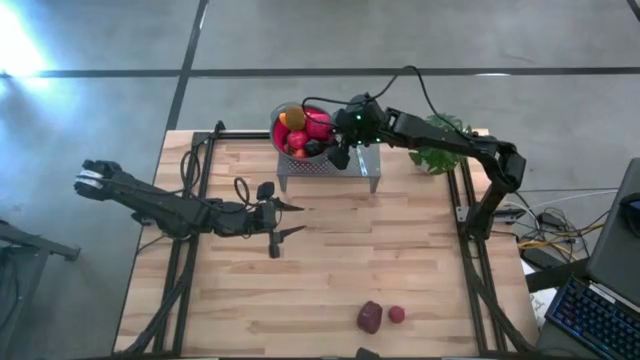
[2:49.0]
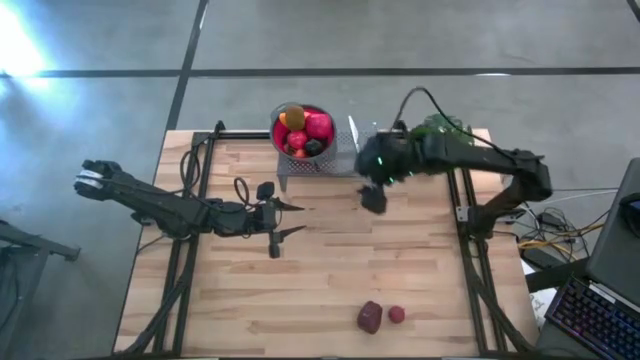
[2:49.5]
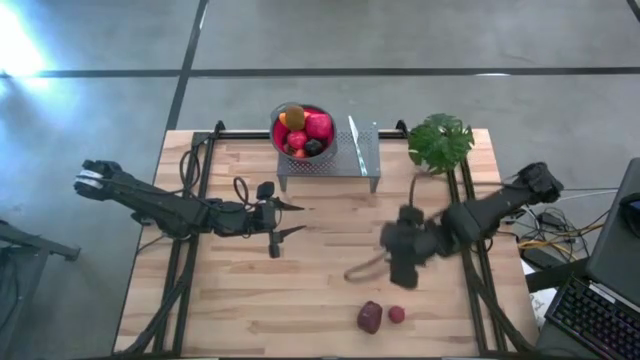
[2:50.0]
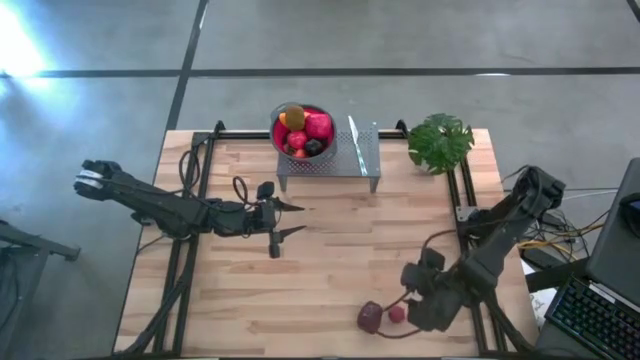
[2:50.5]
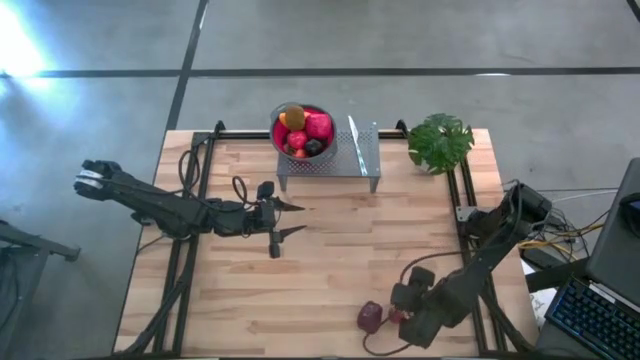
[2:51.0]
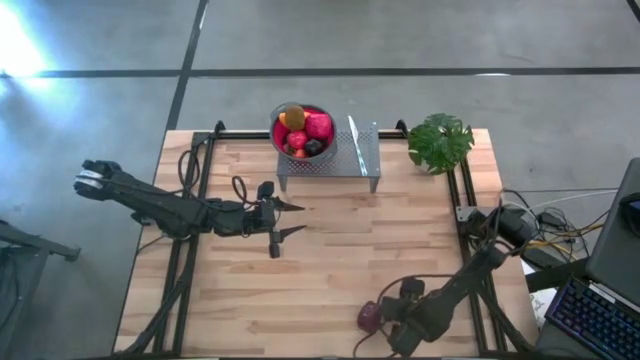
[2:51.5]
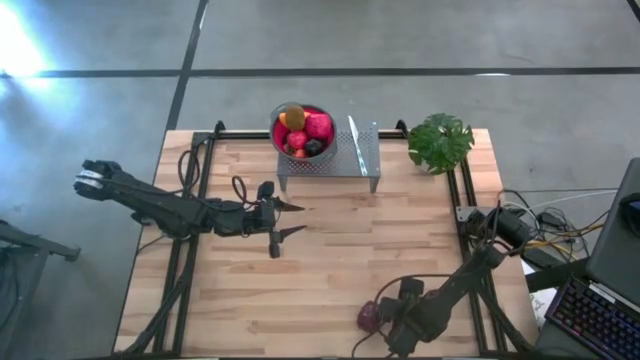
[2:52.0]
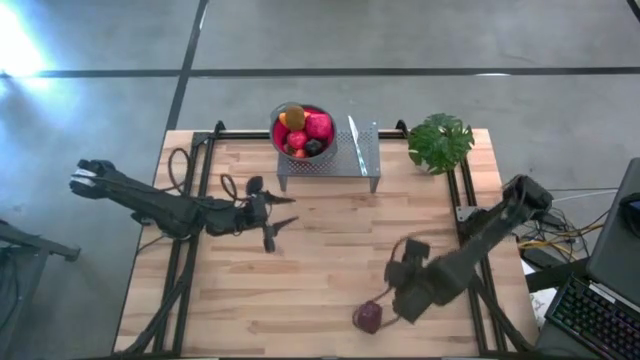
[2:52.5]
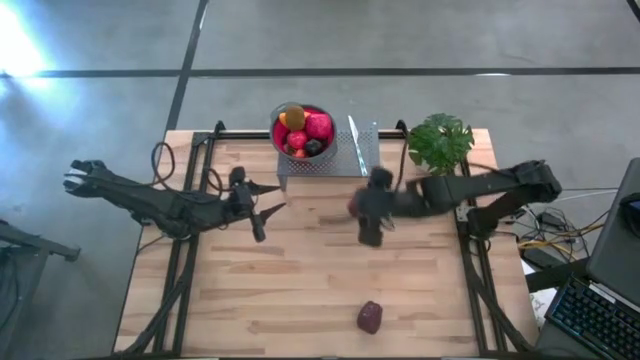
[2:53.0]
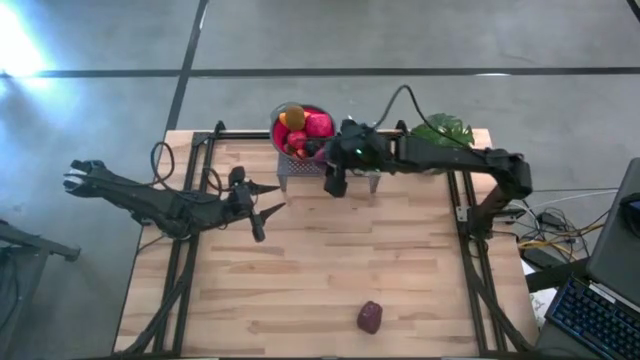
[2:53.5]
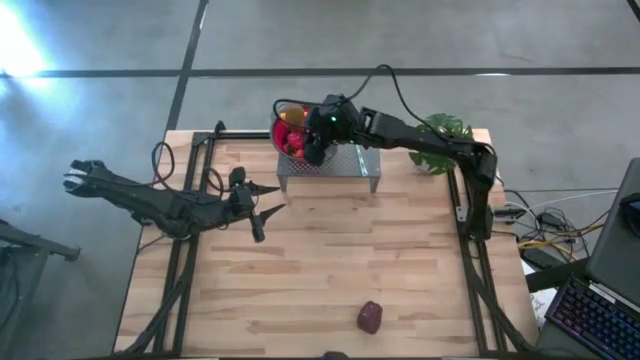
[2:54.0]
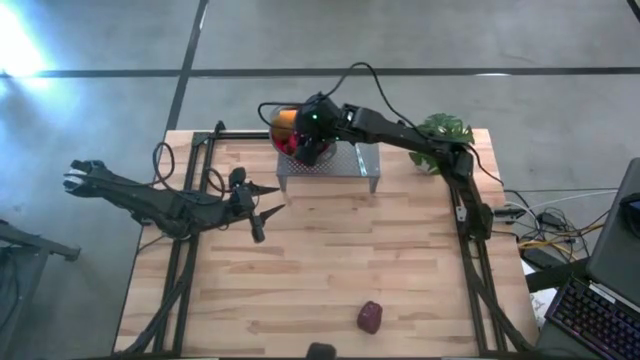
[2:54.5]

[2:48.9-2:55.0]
Task: Pick & Place Fruit
Put the red pomegranate into the red strainer bowl on the shelf

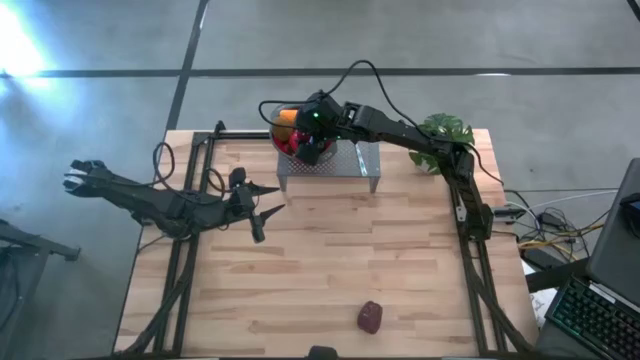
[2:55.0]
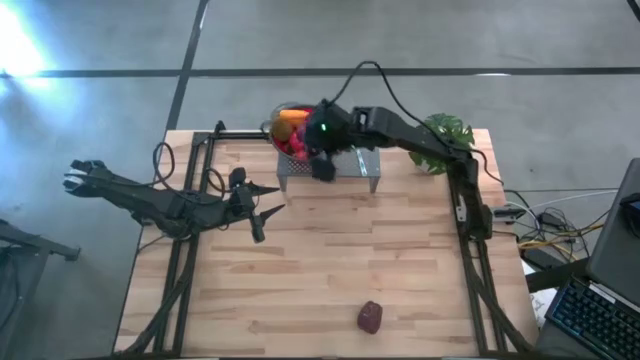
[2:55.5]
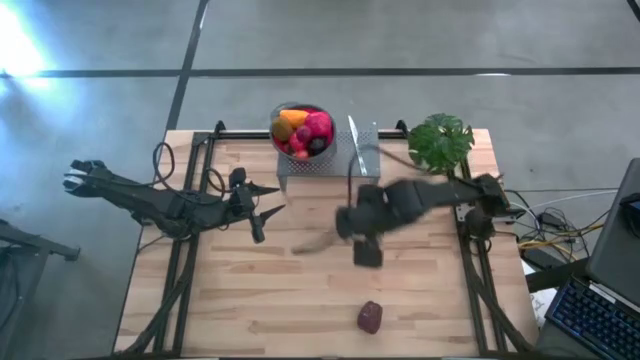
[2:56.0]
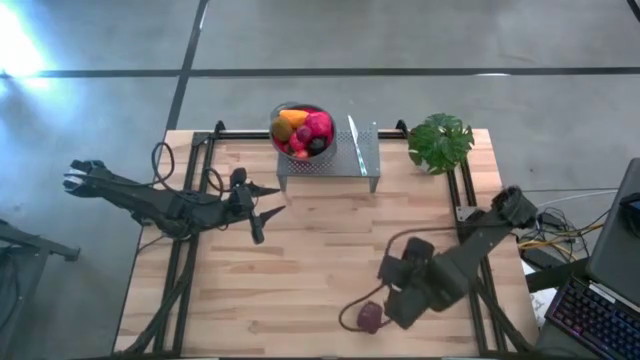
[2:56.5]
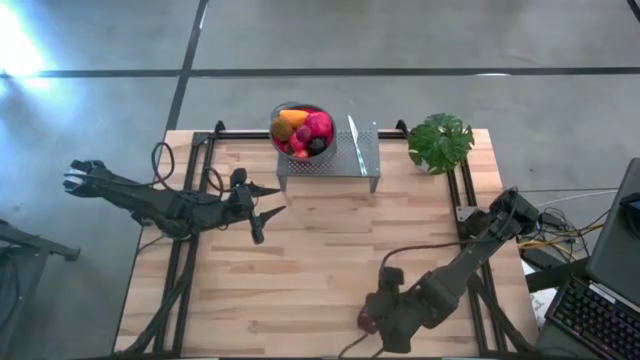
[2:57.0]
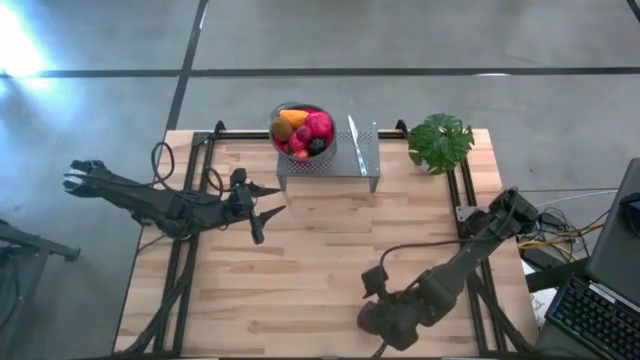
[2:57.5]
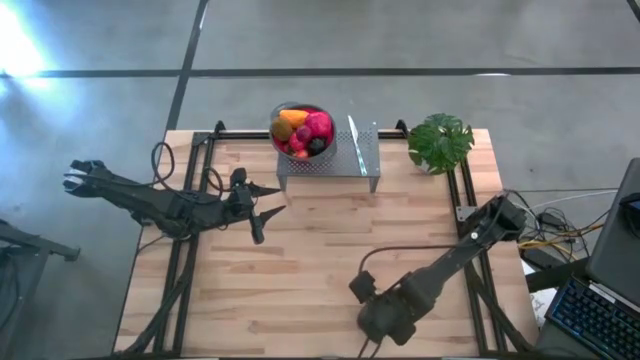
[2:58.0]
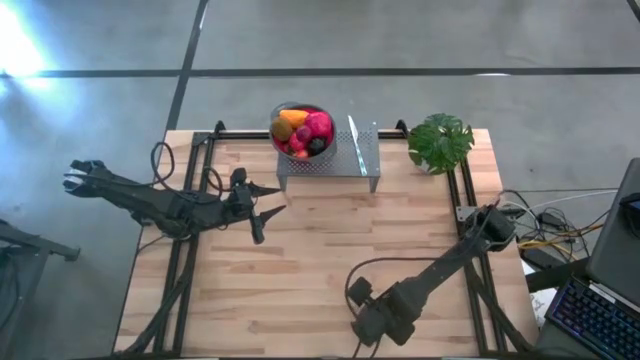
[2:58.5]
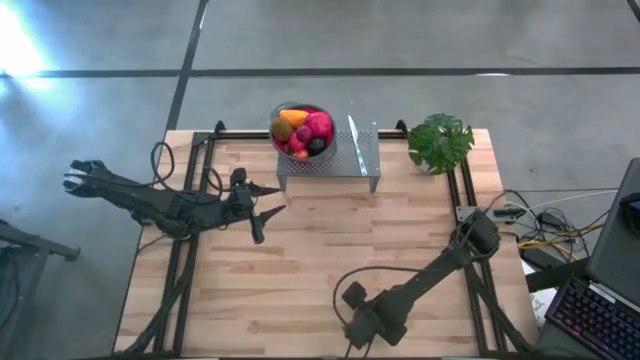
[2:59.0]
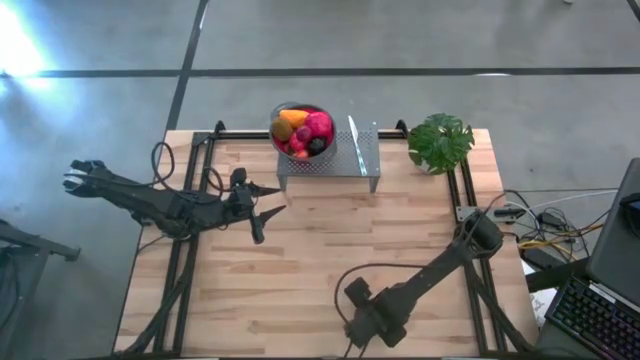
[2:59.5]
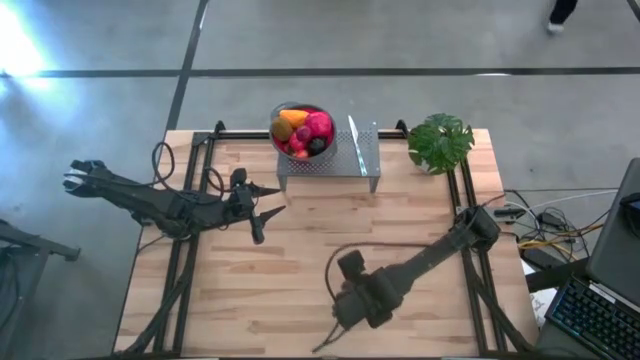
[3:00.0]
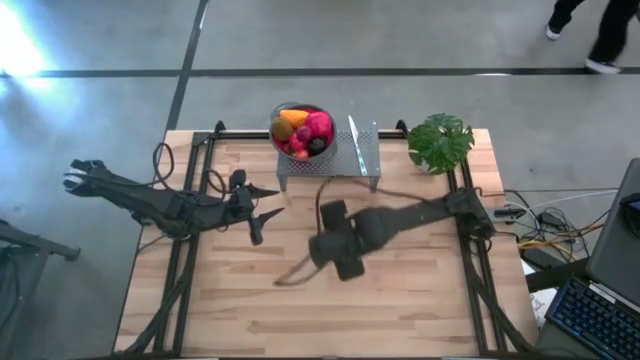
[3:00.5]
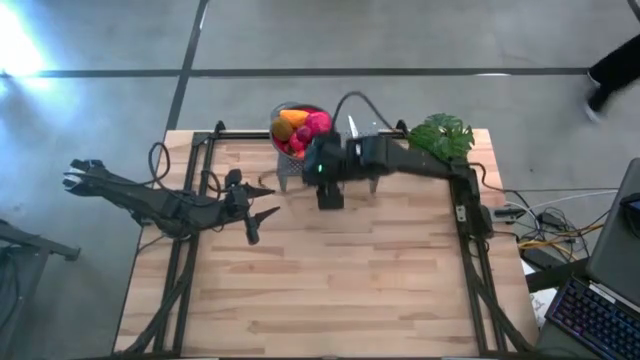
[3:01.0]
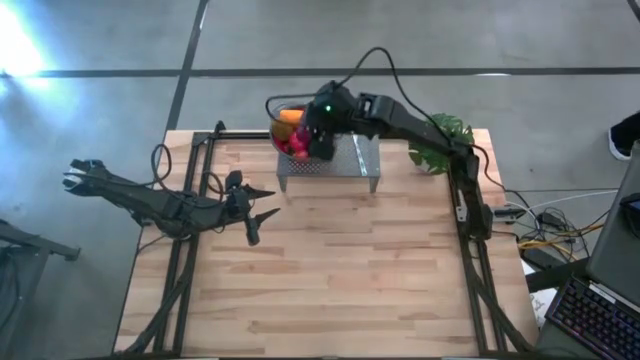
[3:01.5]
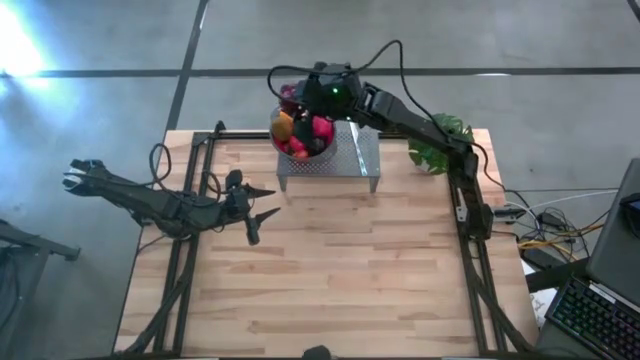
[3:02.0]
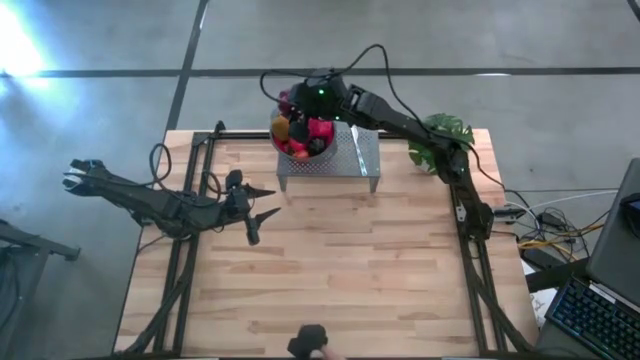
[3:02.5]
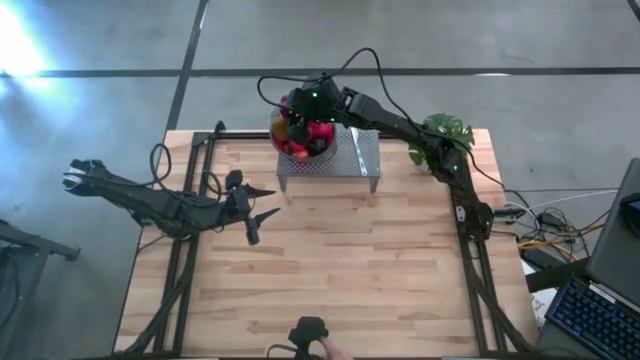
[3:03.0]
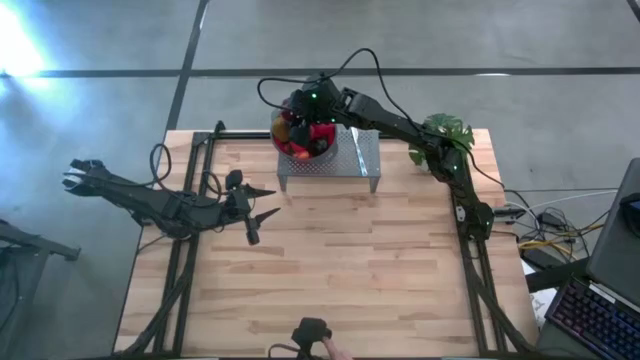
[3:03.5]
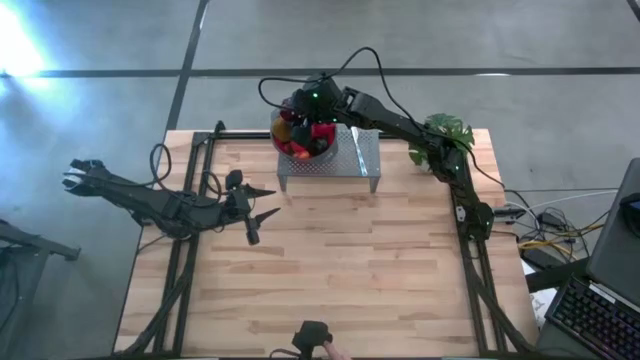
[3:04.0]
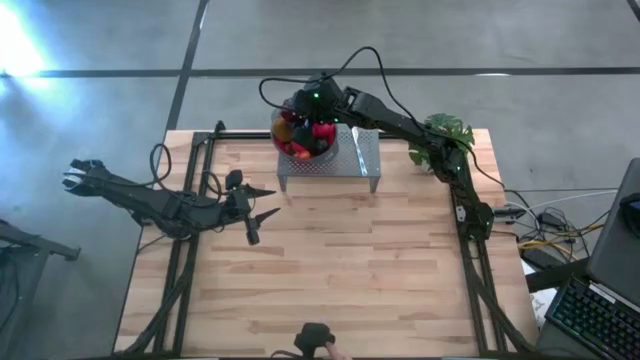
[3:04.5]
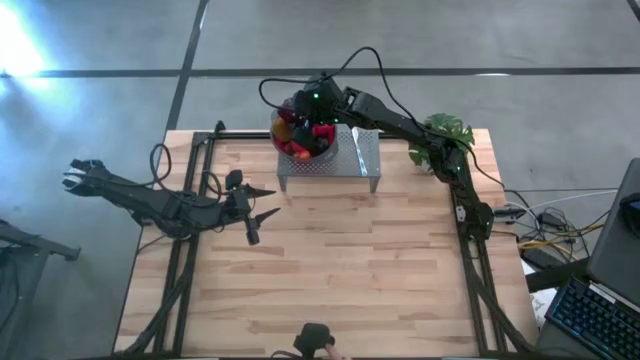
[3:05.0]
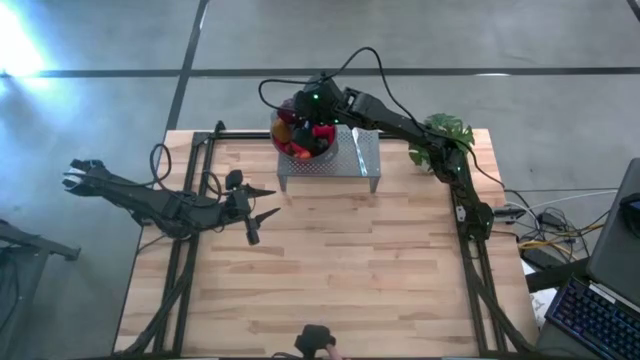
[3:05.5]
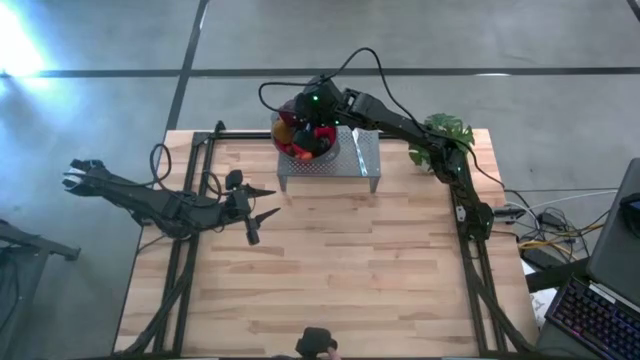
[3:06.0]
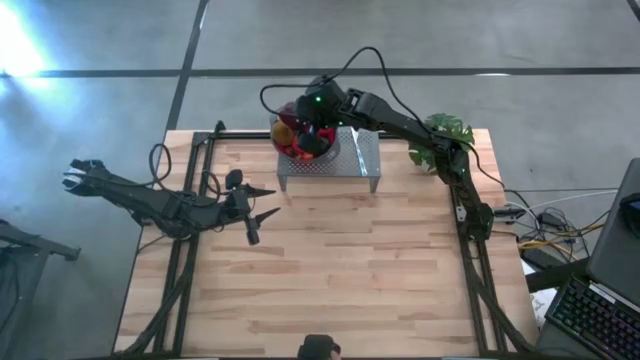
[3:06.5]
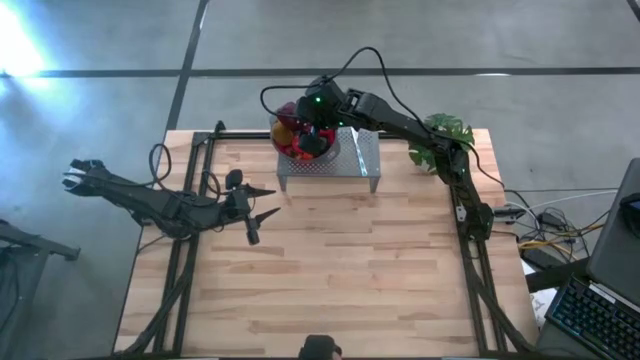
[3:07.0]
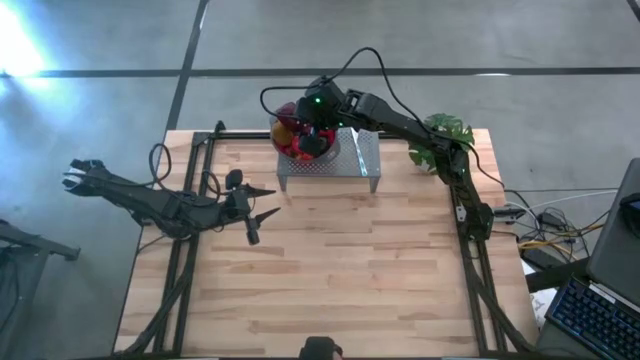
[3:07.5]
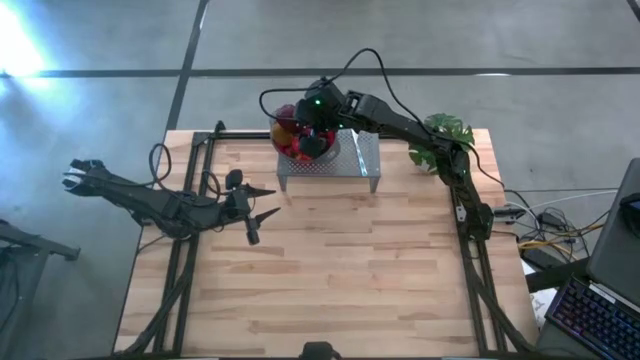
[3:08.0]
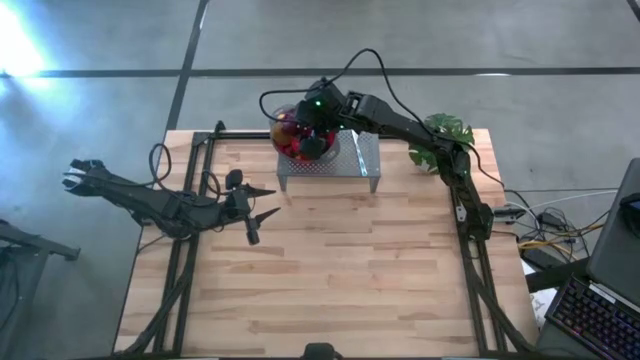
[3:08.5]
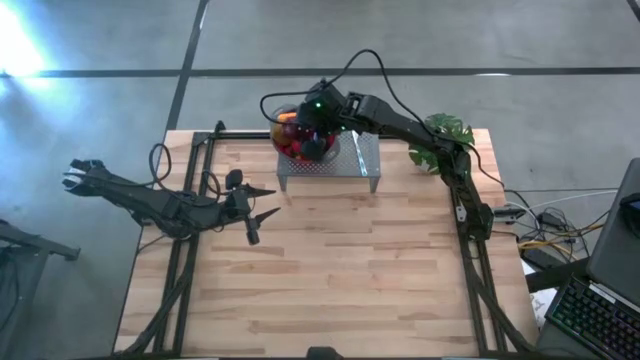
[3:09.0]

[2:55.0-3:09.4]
Put the maroon apple into the red strainer bowl on the shelf
